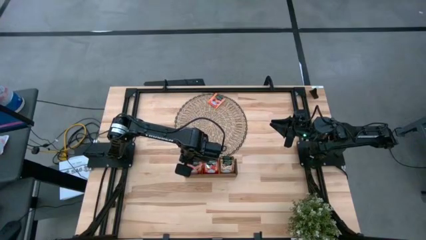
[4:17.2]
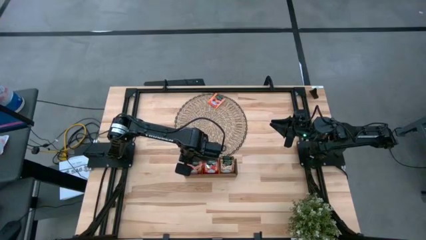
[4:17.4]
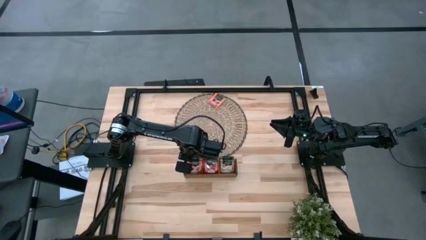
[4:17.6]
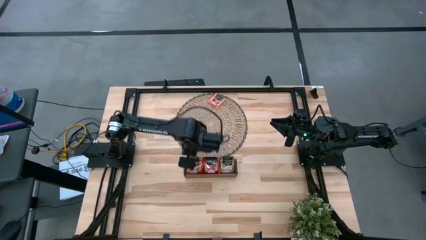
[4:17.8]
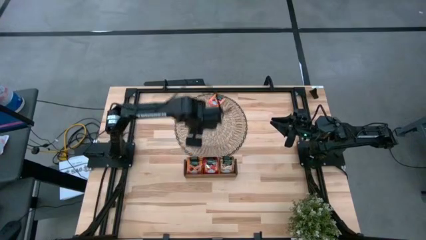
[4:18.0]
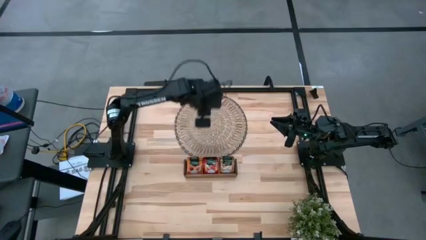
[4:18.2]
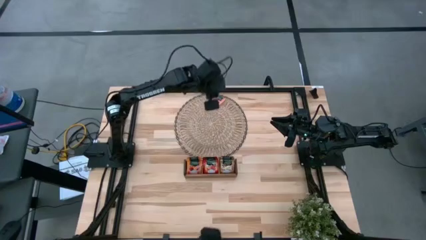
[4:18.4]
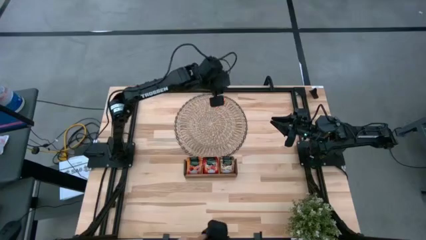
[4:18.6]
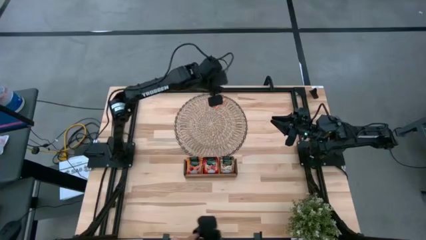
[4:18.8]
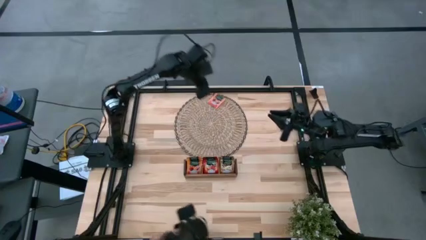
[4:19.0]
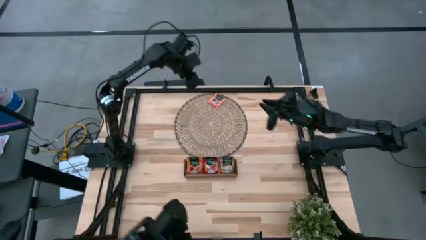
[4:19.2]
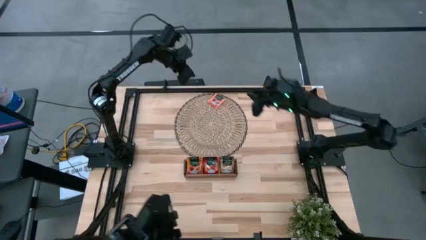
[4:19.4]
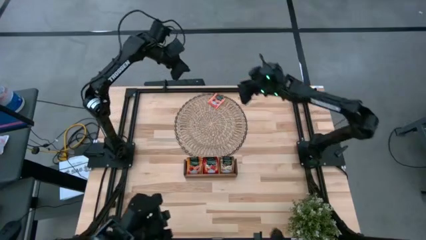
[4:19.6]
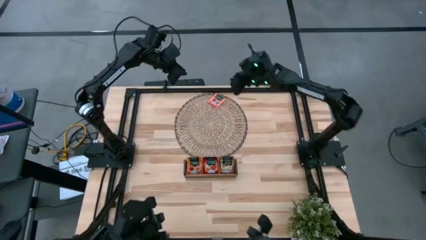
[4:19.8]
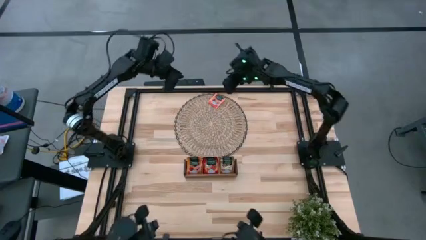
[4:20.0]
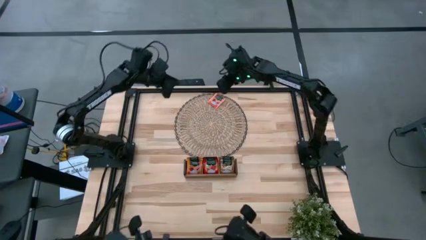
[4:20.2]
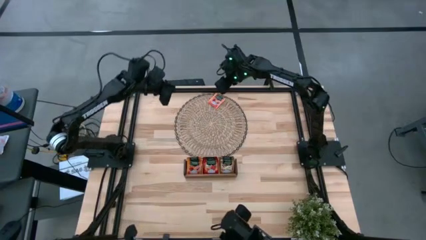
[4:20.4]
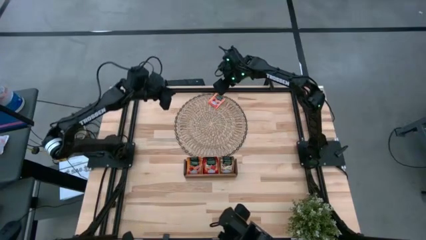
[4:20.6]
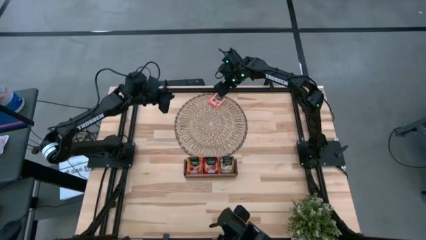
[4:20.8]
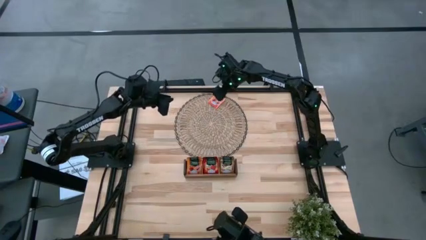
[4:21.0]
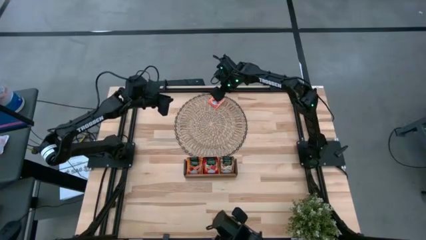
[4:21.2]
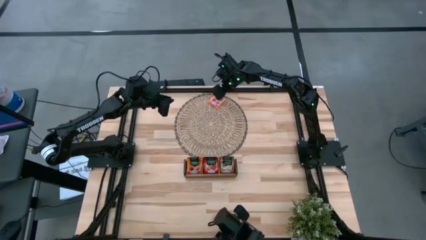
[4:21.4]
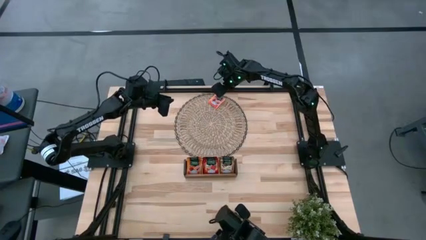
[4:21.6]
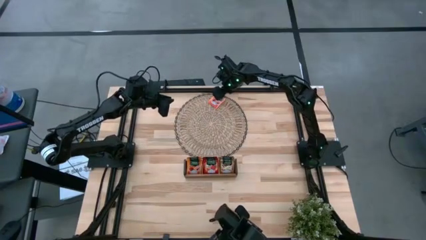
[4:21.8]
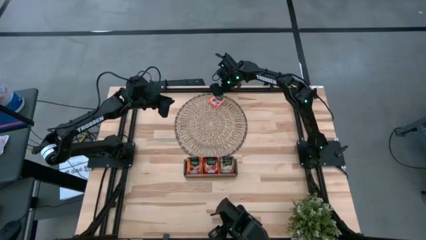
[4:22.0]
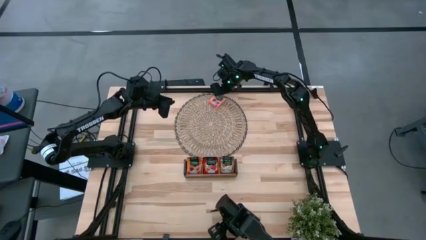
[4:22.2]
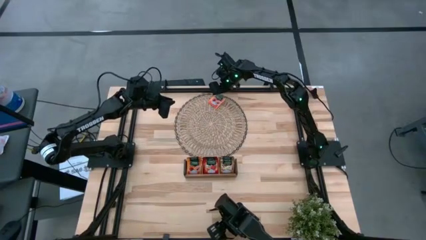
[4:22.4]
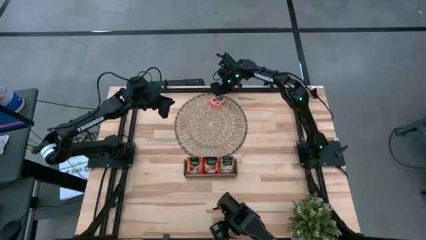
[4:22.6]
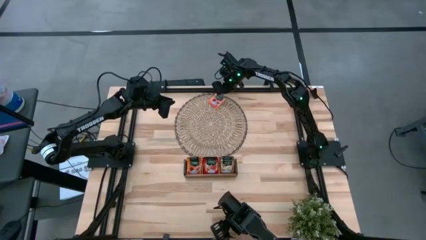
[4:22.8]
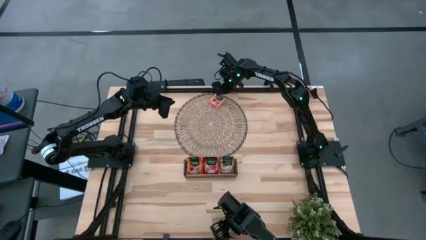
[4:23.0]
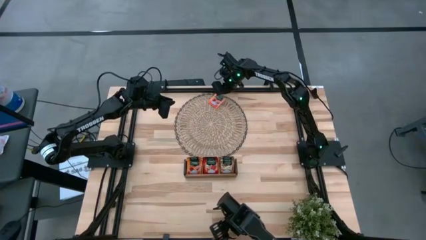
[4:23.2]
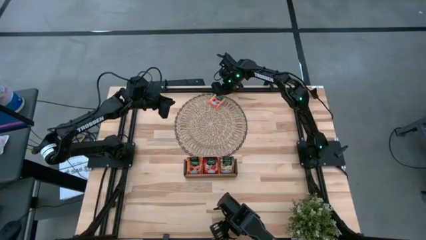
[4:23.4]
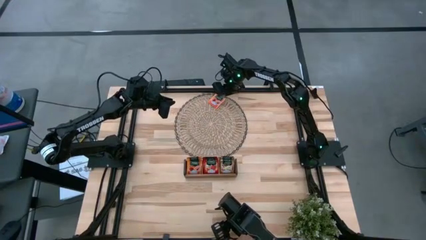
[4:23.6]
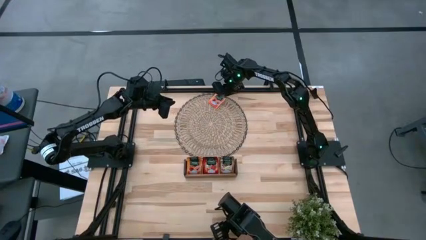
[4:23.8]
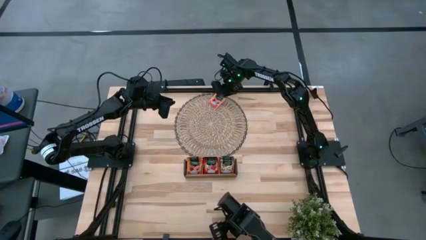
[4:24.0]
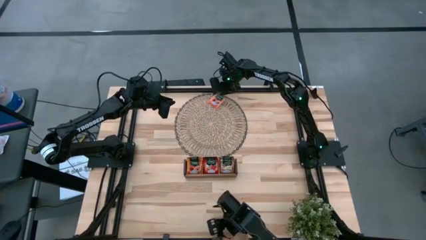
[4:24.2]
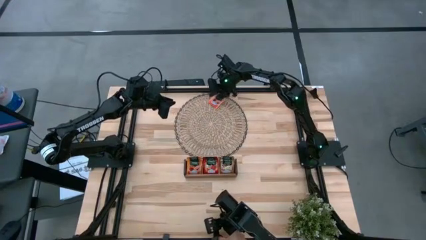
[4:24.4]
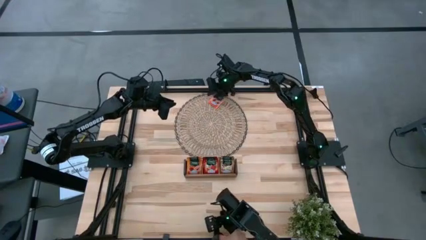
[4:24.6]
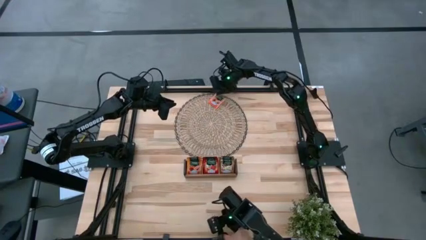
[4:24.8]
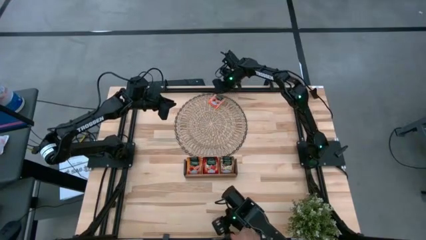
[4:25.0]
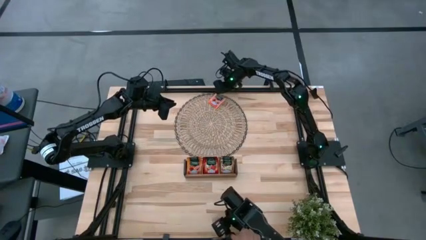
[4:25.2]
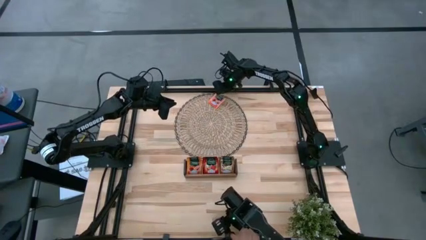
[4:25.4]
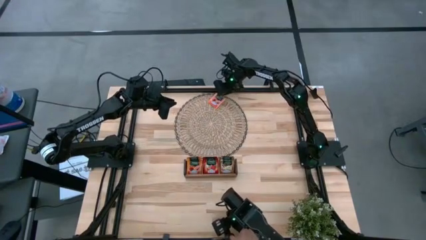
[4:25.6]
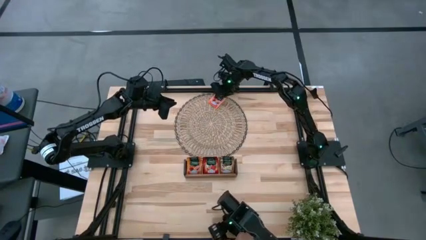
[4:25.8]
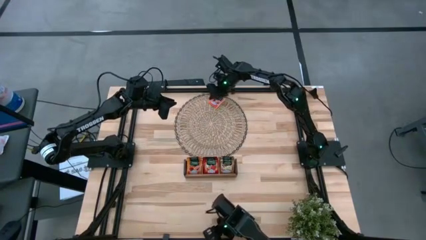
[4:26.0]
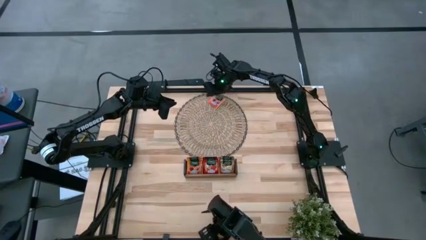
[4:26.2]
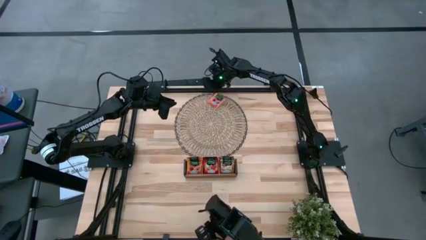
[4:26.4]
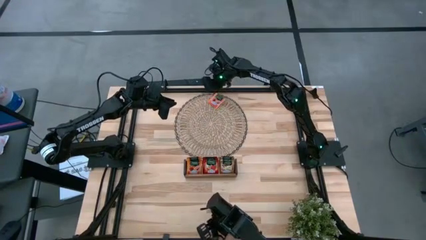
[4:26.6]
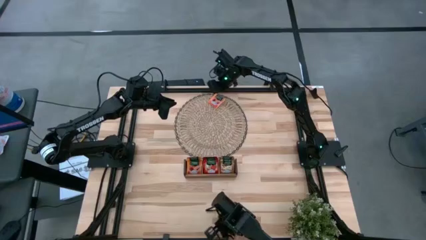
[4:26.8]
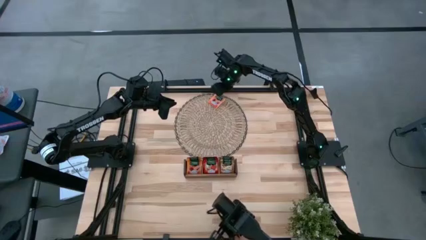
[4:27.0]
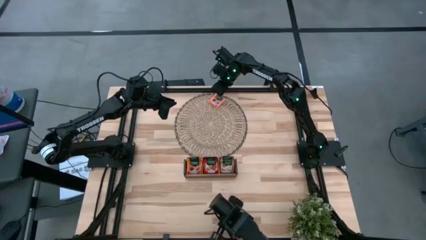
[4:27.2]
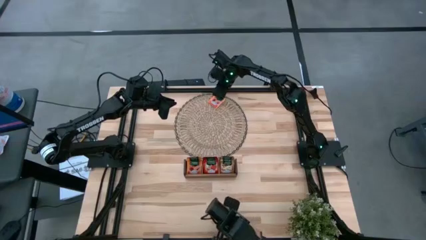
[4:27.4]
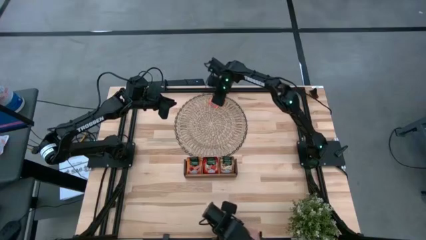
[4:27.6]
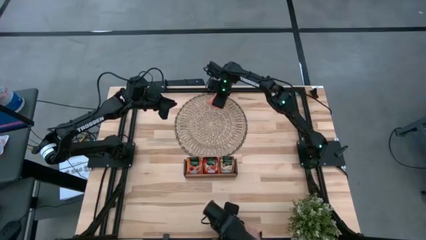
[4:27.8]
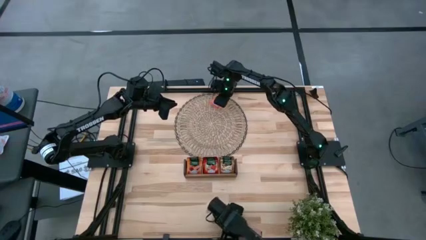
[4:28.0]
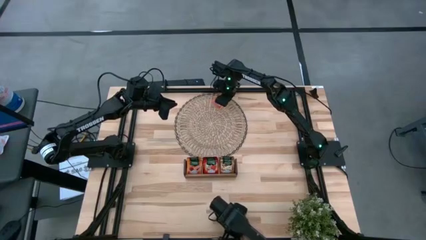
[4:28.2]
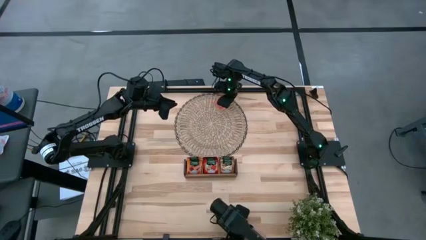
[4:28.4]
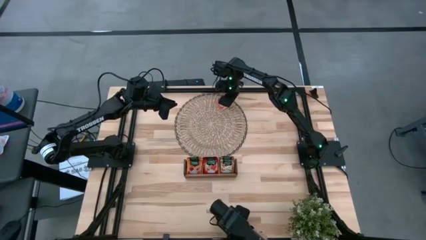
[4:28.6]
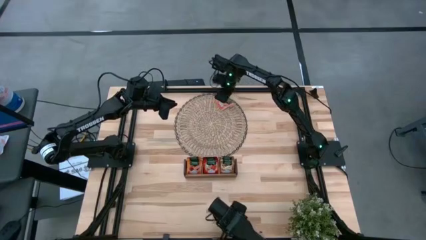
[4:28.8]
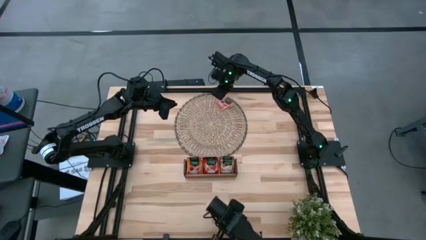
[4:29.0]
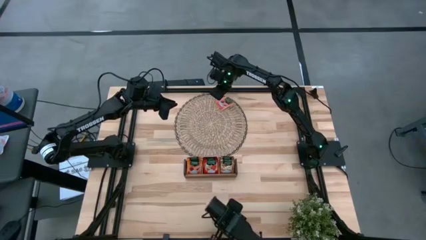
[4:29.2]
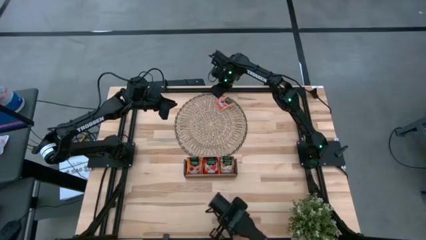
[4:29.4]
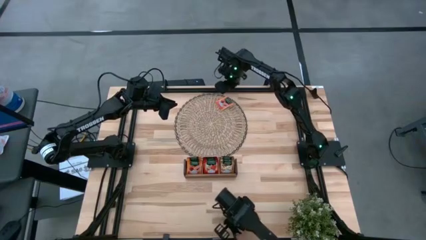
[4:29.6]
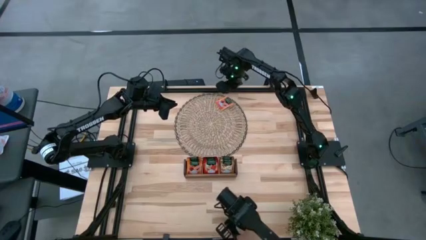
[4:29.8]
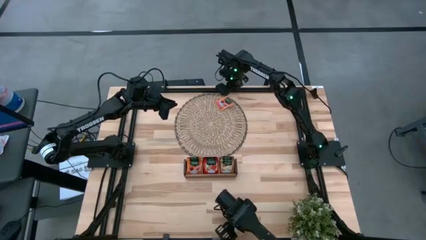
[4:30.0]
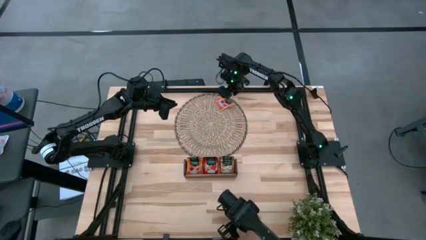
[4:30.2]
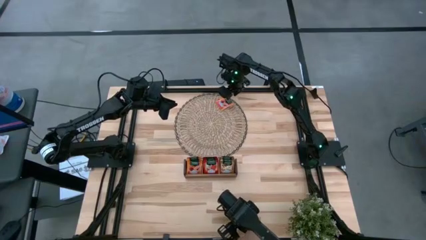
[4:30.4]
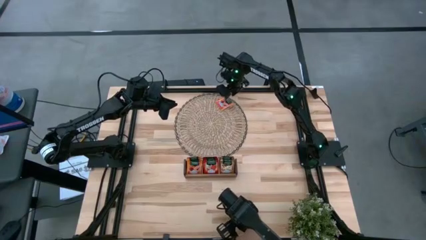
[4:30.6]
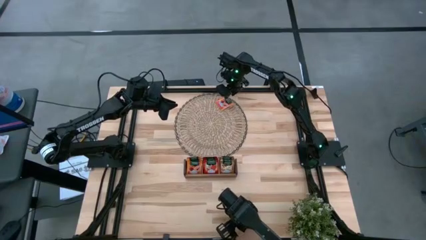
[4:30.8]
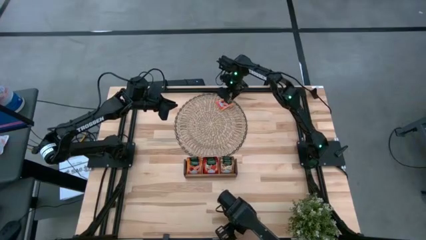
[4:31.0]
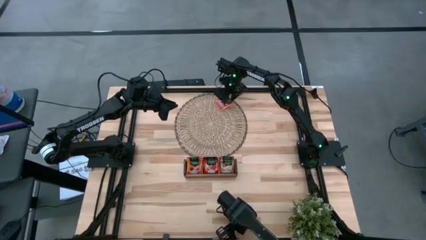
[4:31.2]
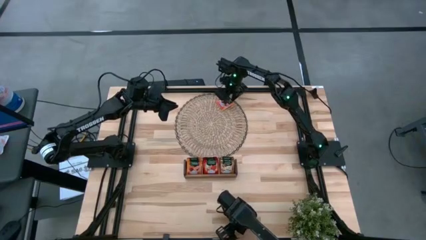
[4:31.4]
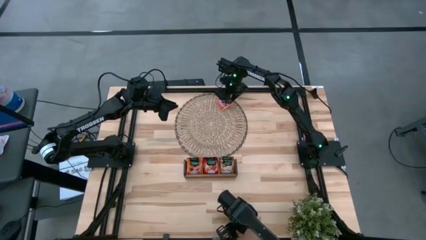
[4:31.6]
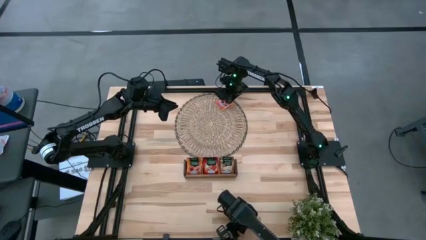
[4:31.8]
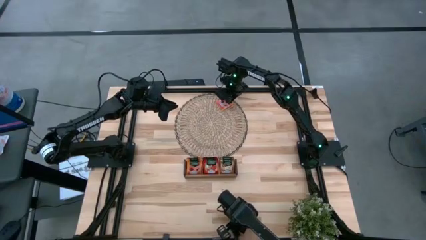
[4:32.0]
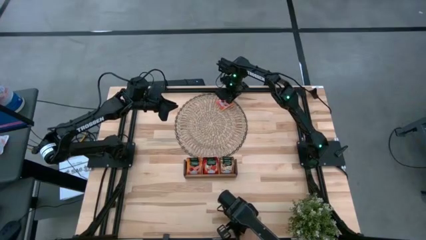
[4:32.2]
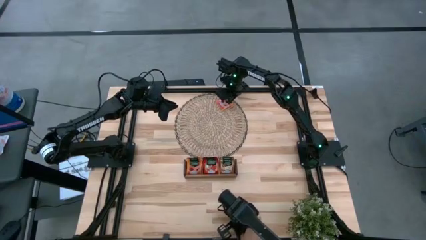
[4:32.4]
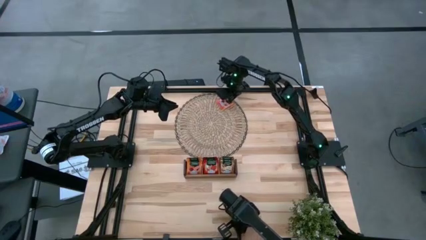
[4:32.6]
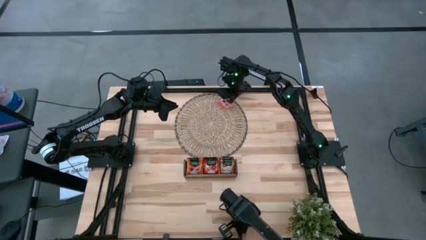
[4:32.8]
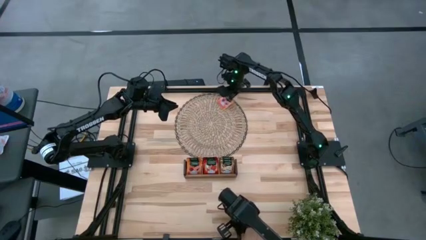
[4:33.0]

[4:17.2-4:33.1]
Task: Pick & Place Tea
Put the orange tea bag into the left section of the wooden organizer
